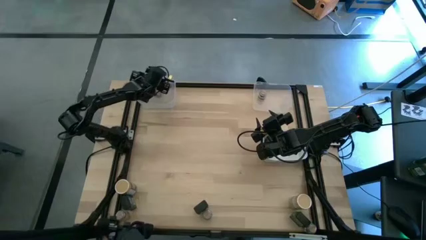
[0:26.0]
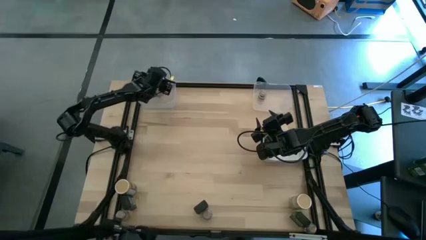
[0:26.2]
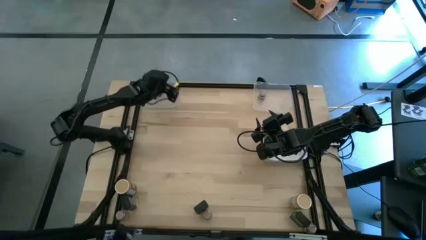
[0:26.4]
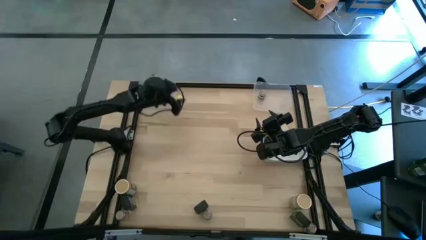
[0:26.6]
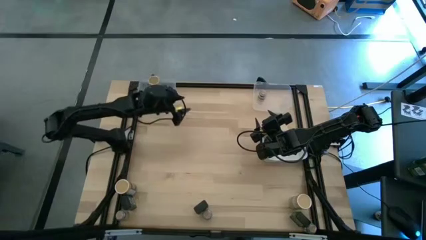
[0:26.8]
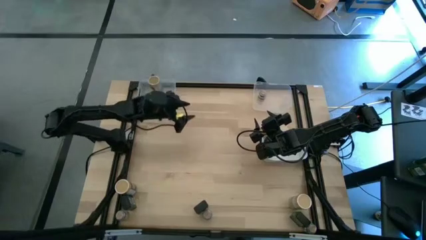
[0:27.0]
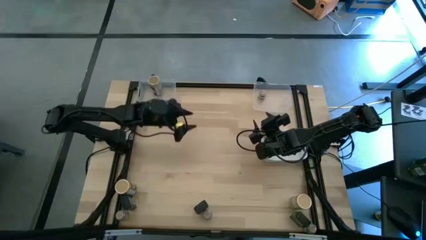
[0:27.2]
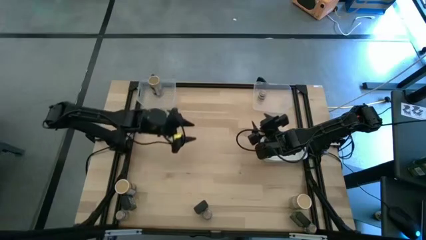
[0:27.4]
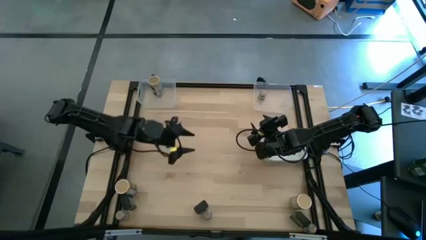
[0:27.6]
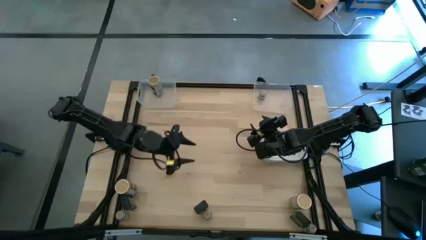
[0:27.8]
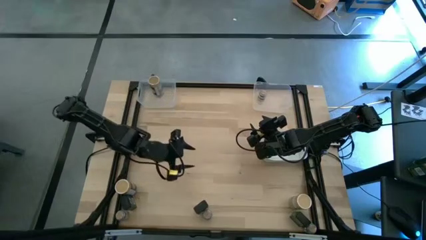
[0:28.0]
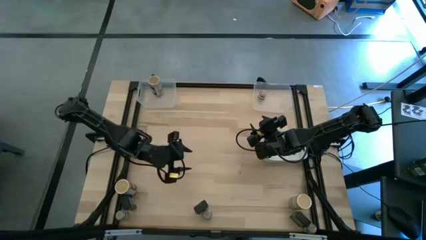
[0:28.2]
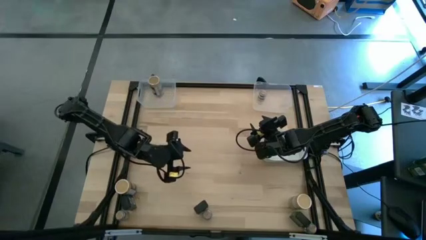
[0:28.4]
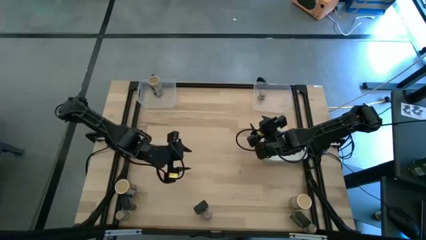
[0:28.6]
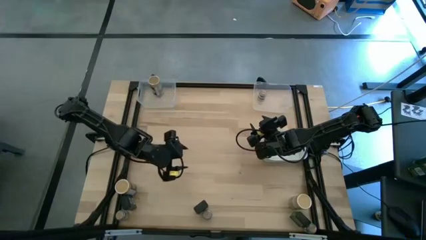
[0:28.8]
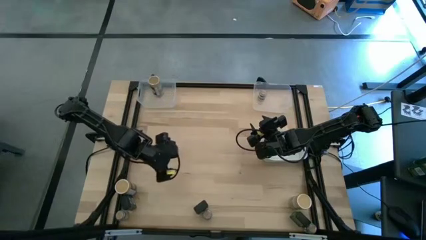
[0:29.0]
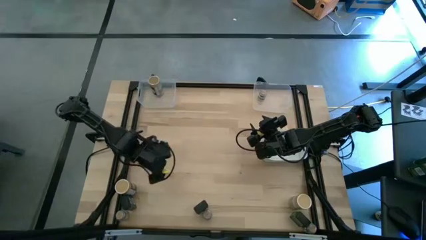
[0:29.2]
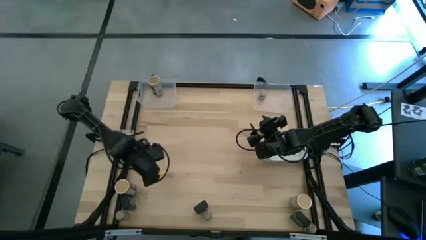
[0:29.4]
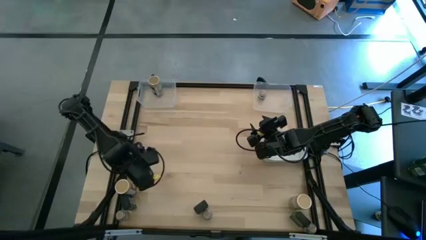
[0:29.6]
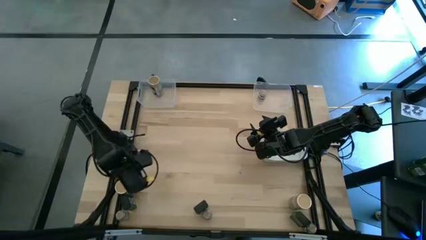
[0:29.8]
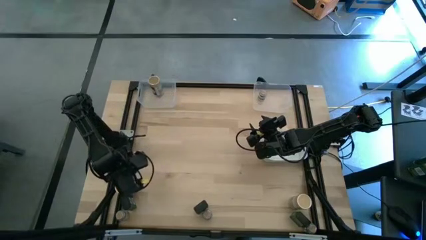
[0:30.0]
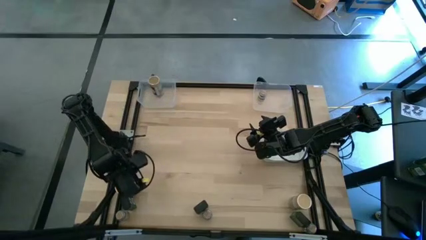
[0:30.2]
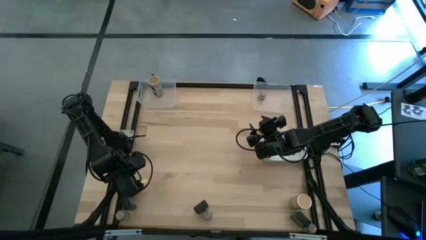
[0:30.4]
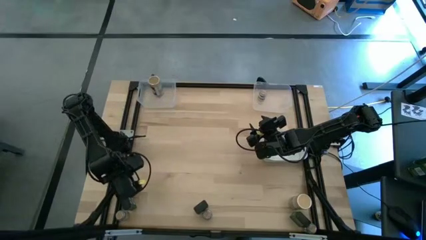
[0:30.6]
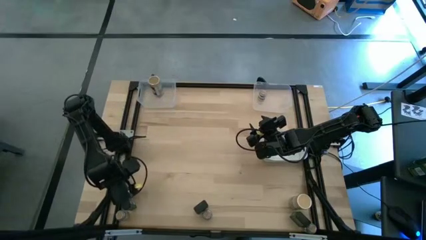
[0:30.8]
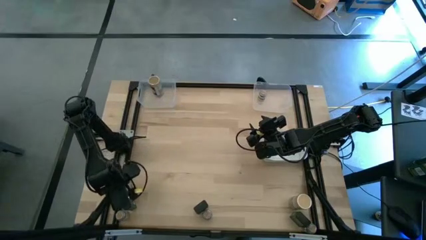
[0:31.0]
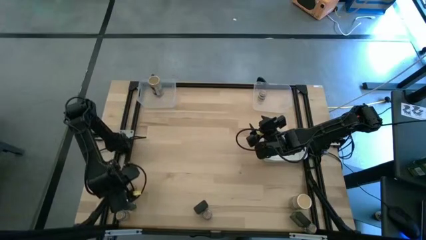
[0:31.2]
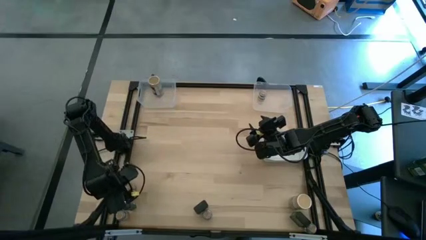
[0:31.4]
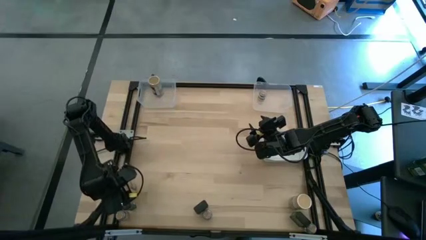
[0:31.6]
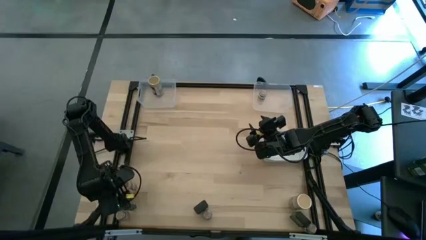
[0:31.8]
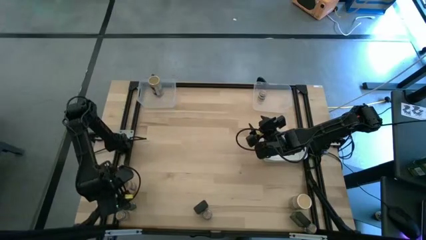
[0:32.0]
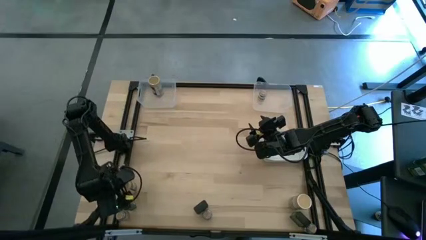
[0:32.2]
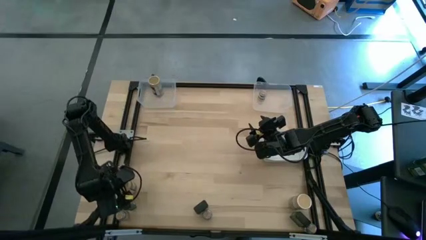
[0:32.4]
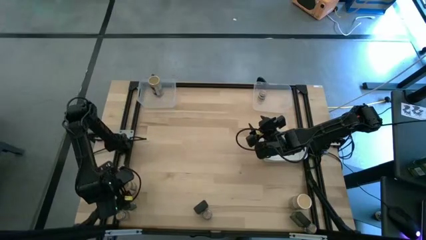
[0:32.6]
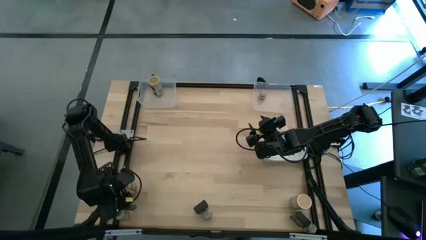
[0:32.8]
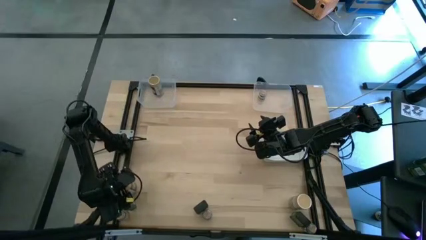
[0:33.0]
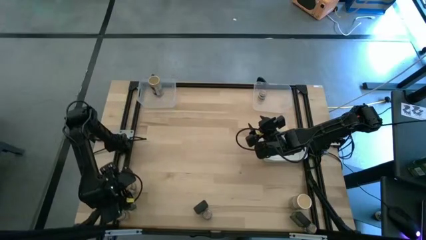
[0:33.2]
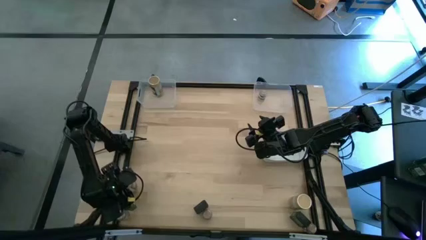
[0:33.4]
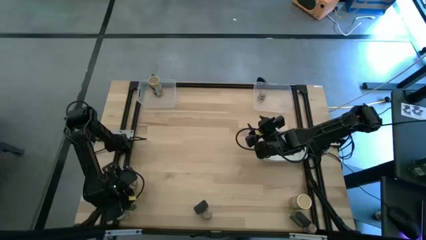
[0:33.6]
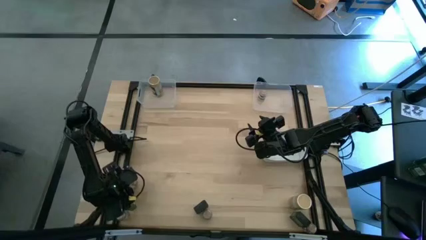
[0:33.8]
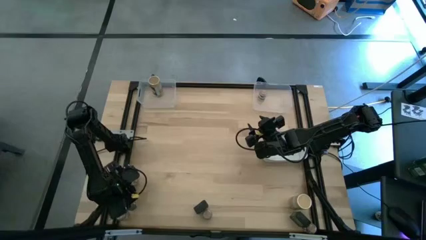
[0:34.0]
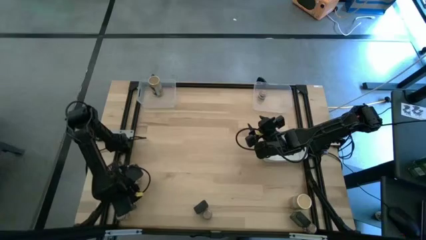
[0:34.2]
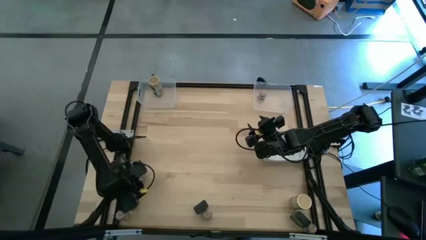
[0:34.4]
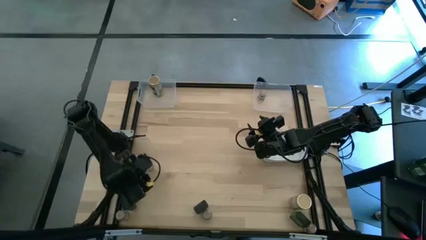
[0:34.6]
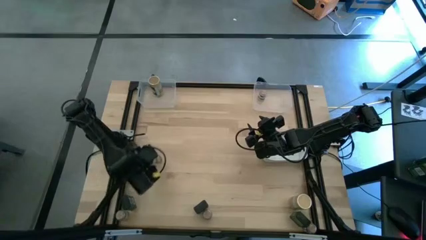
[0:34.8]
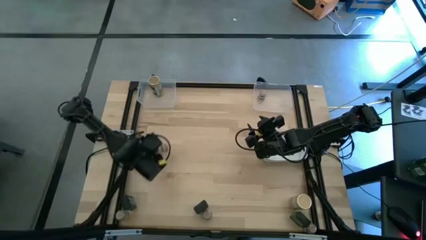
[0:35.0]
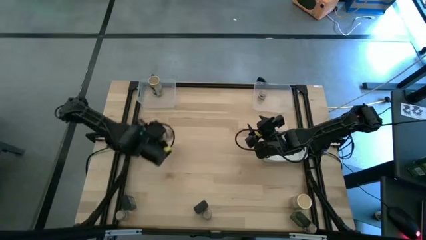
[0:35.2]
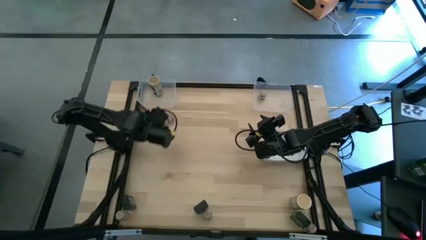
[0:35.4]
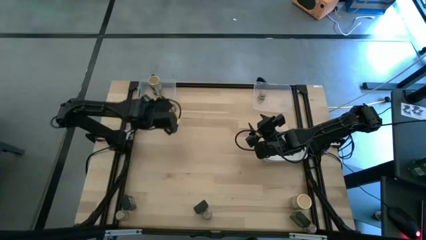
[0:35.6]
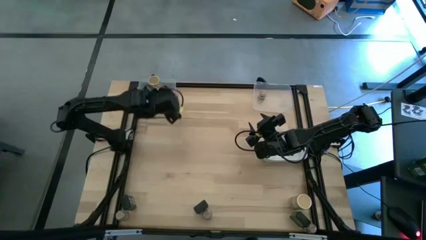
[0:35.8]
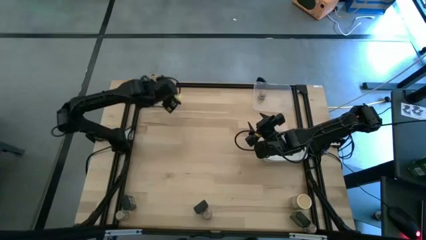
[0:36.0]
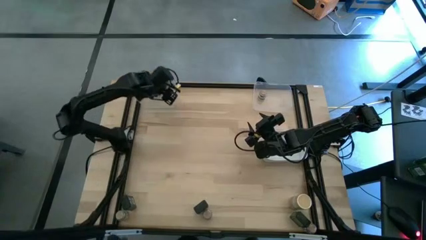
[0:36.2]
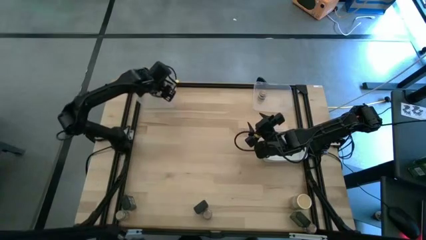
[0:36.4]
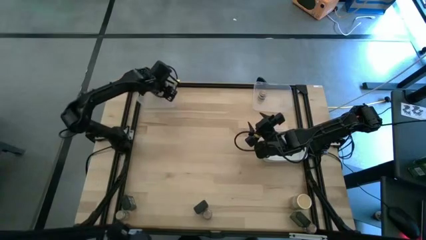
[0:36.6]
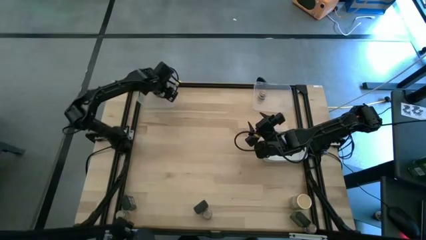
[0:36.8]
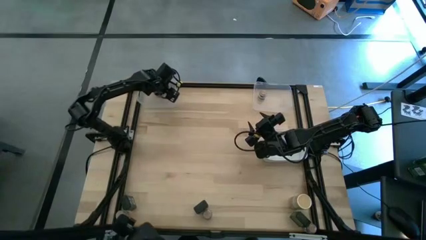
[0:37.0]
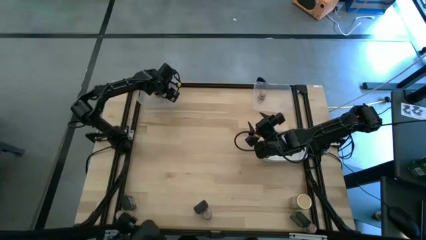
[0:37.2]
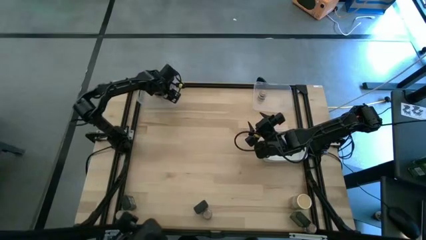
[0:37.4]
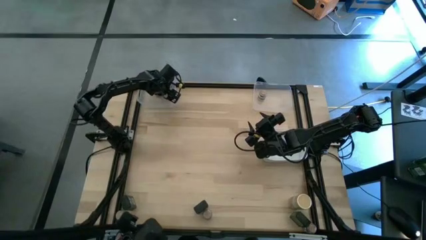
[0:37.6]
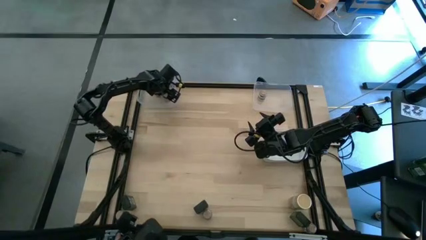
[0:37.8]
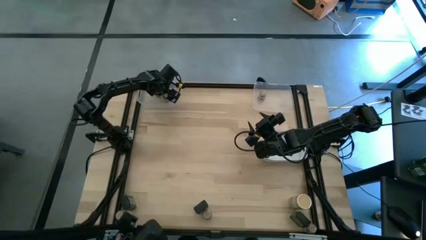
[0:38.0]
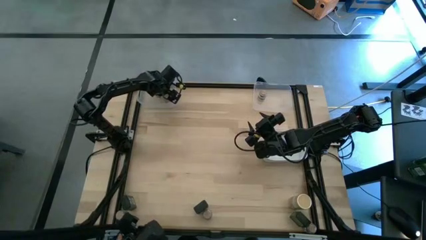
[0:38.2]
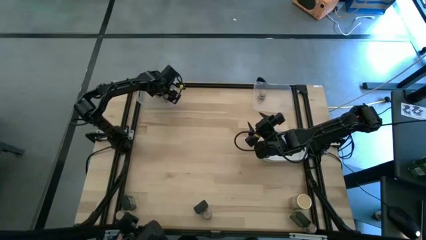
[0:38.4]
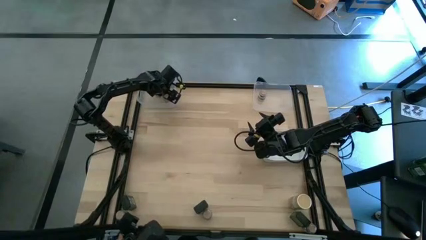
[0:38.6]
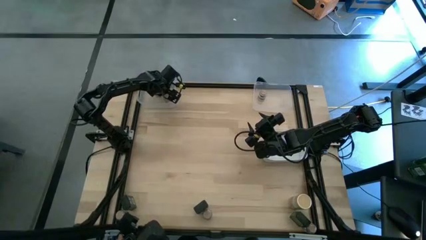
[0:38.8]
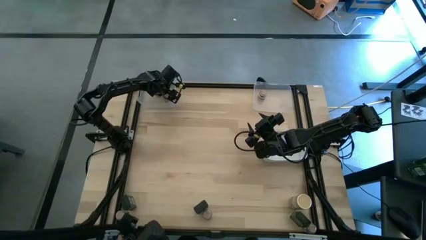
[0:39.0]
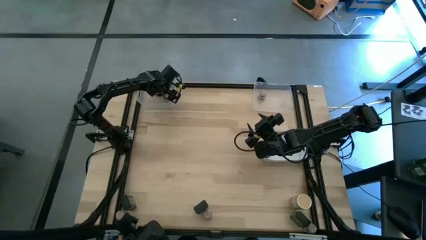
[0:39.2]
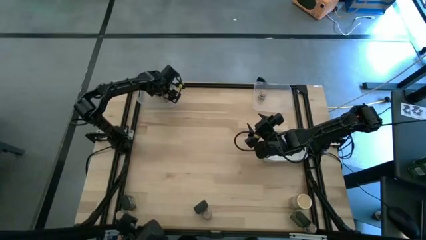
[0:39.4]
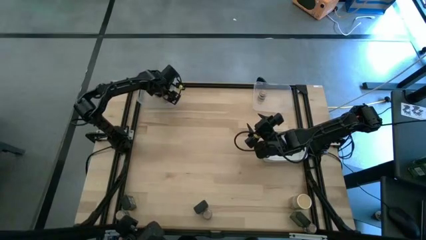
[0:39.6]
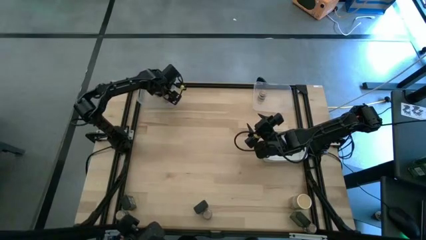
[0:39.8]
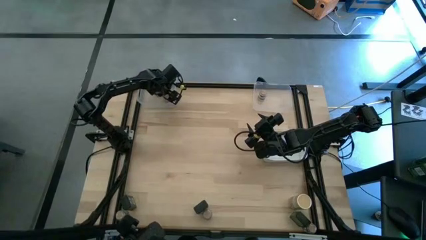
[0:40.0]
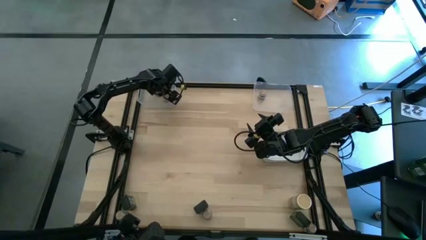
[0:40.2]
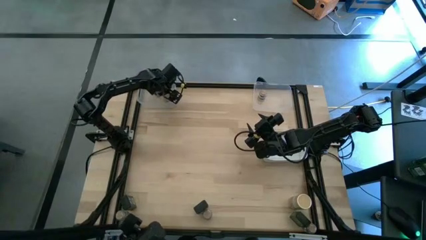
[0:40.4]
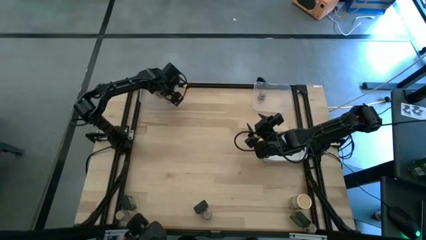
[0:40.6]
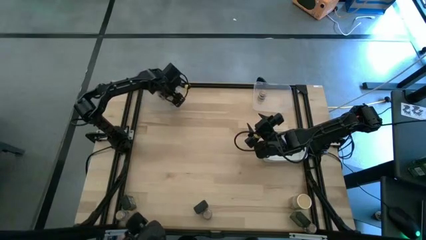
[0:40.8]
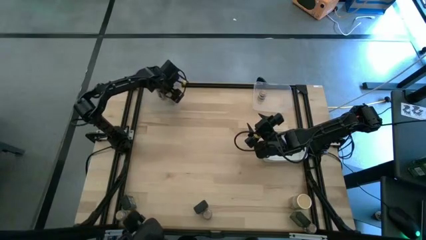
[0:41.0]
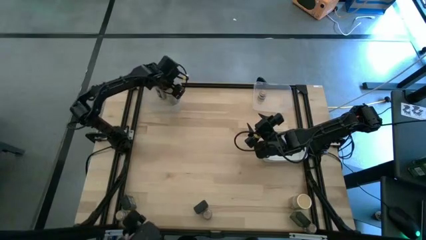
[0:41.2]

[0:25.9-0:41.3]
Task: Sort spices by type
Put the left cream brown seasoning bottle into the left transparent bin

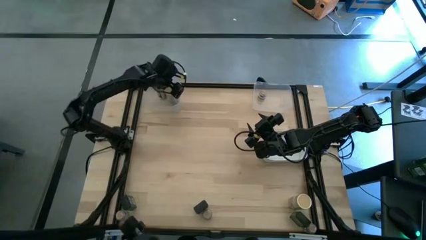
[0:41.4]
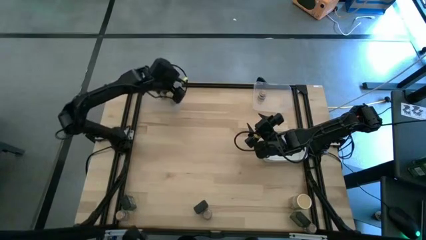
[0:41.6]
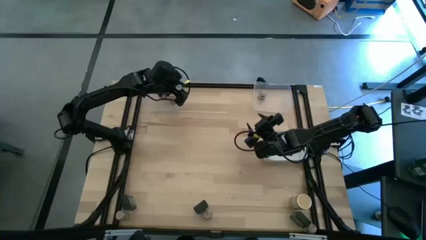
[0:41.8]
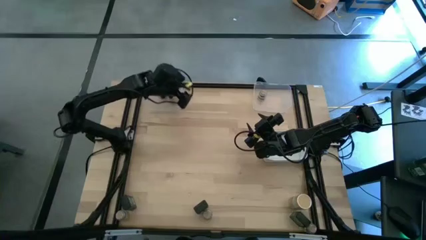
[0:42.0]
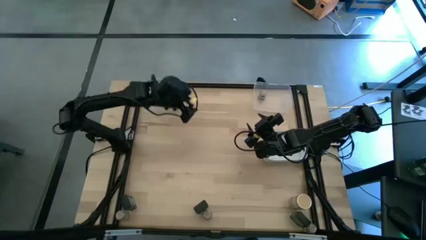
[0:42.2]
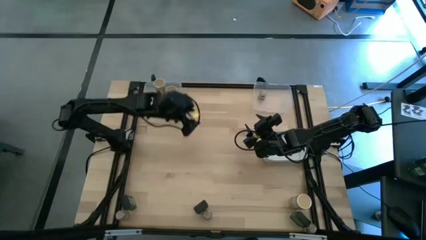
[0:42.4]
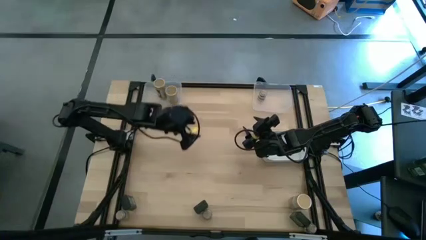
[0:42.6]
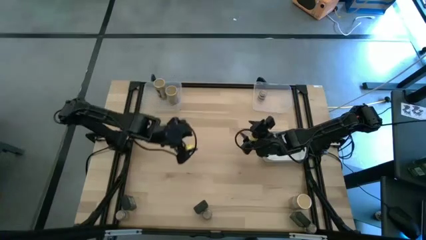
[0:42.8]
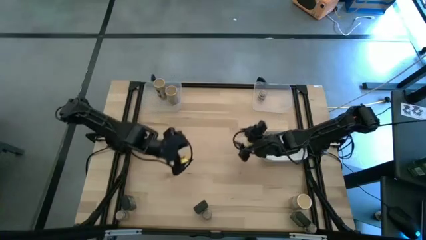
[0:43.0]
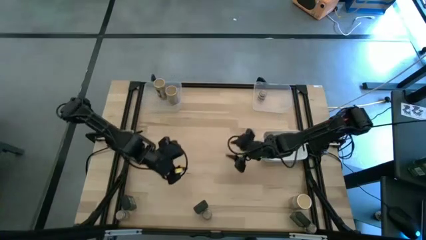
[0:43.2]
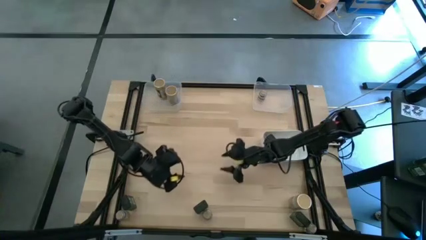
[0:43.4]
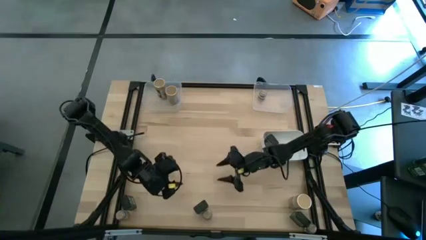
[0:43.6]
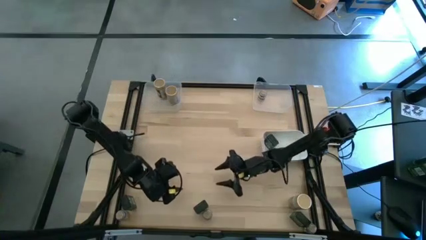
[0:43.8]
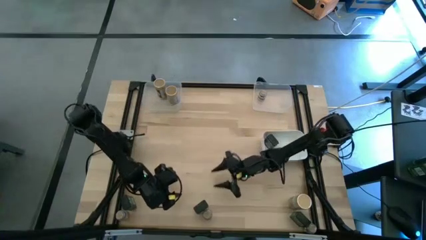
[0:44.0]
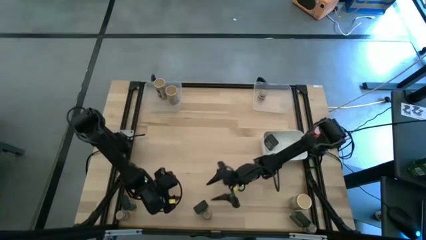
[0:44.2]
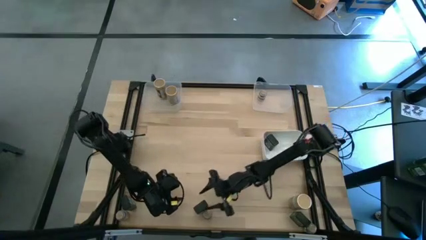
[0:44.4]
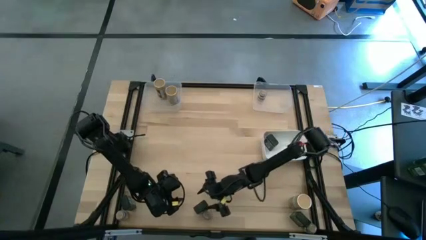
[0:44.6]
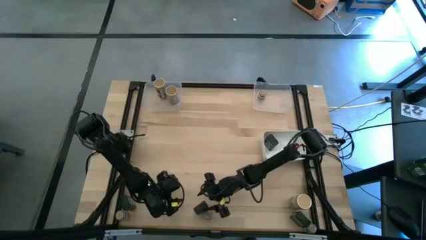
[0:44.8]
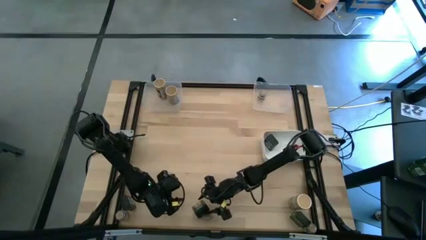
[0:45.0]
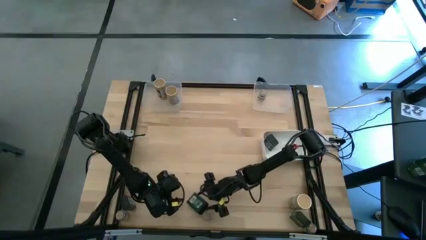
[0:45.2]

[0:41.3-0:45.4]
Put the middle black seasoning can into the white bin
